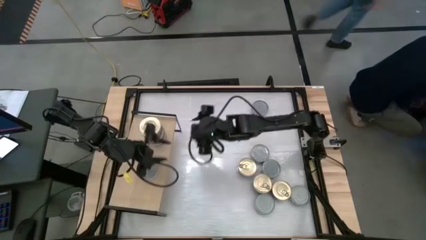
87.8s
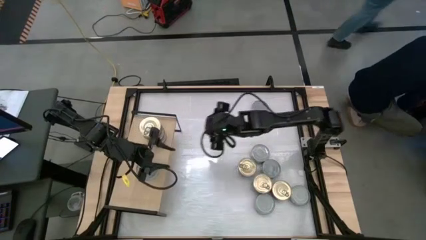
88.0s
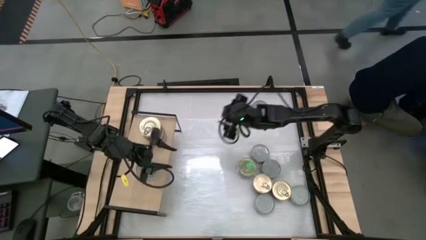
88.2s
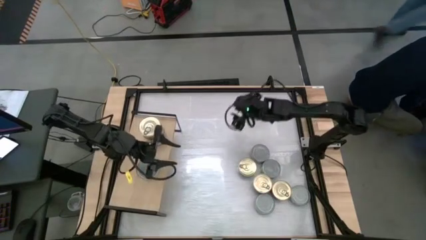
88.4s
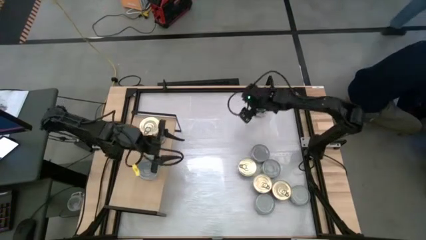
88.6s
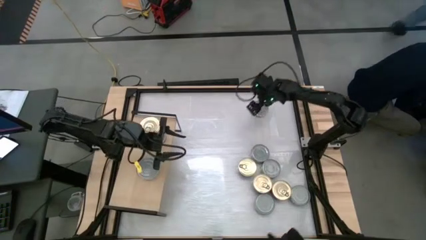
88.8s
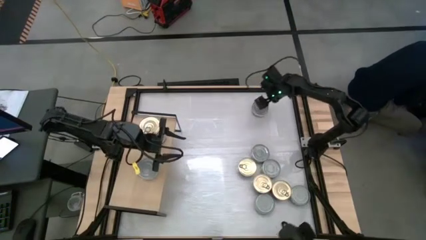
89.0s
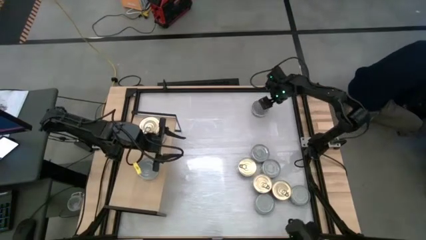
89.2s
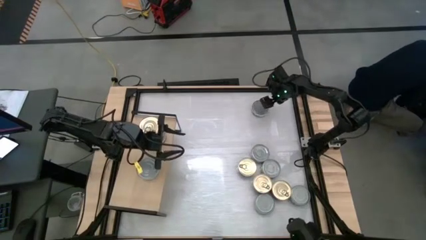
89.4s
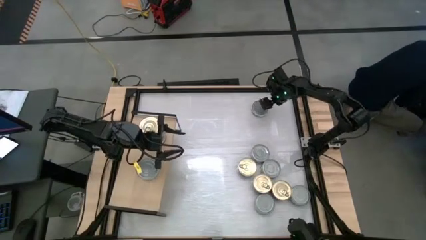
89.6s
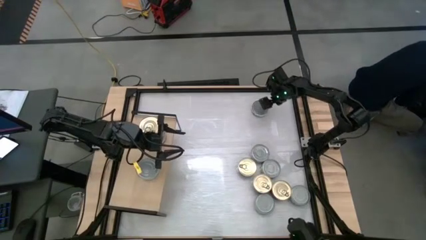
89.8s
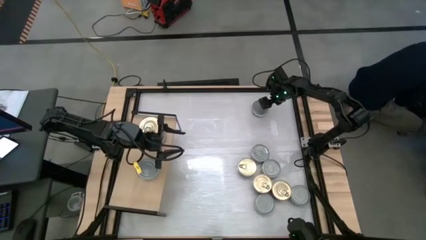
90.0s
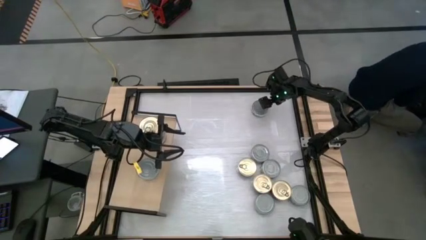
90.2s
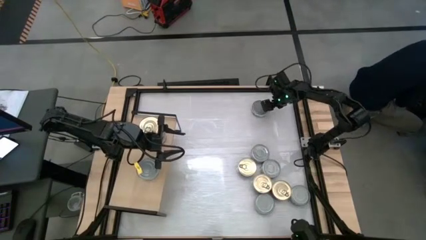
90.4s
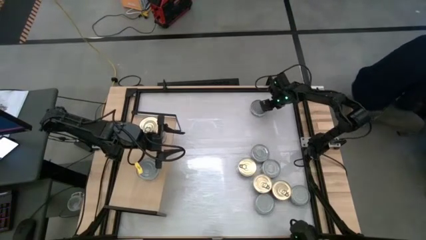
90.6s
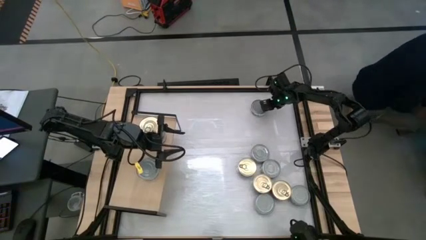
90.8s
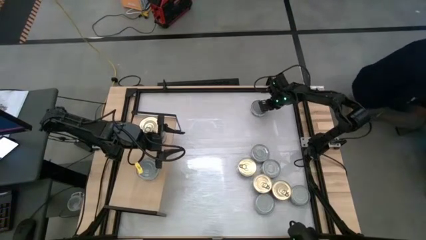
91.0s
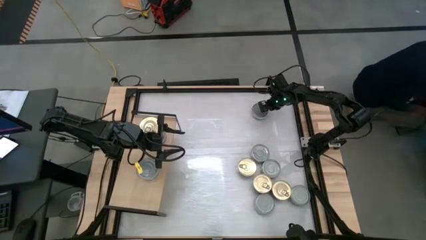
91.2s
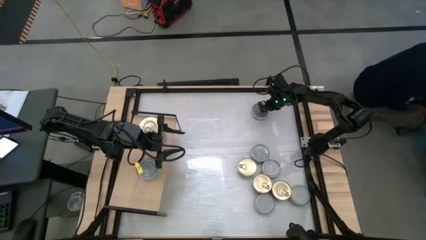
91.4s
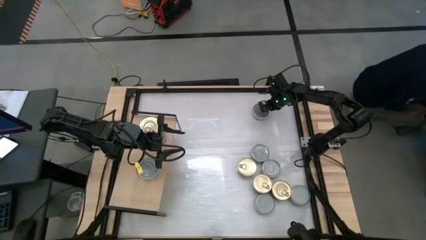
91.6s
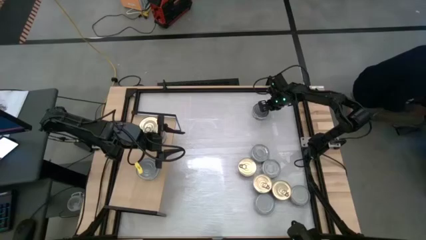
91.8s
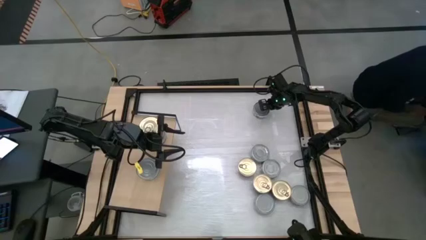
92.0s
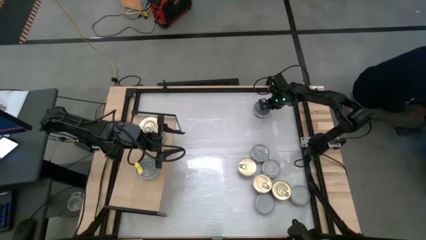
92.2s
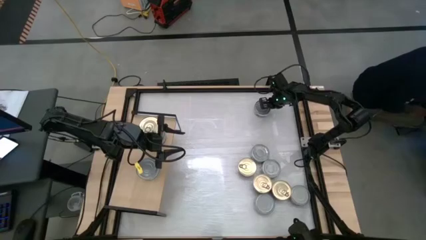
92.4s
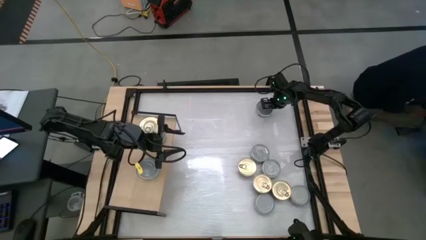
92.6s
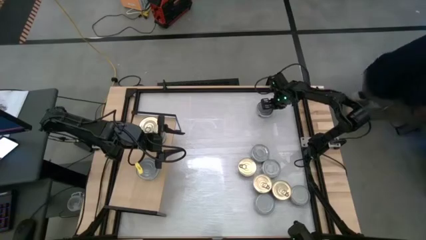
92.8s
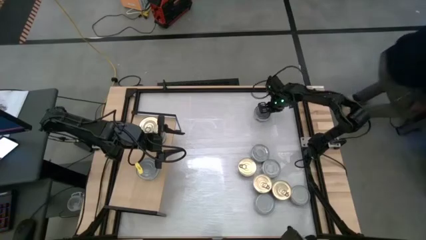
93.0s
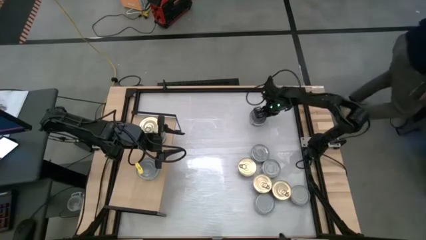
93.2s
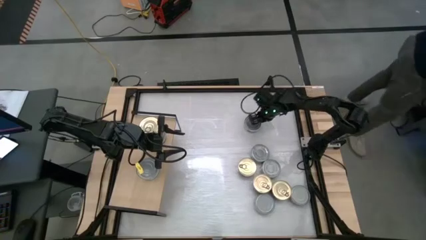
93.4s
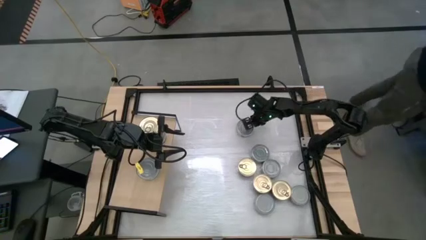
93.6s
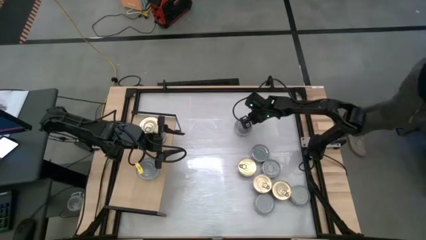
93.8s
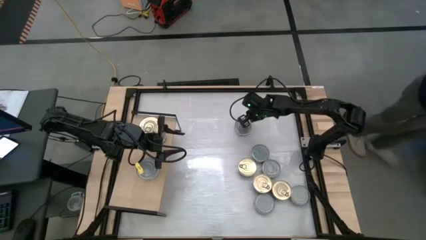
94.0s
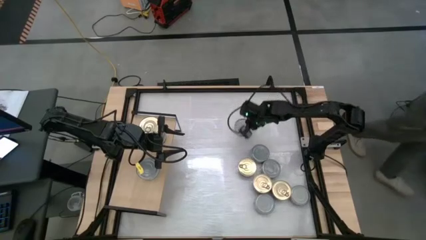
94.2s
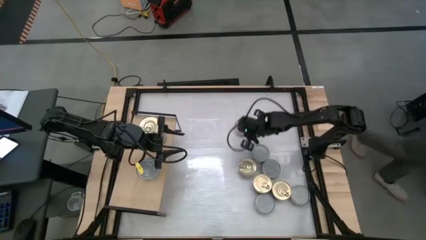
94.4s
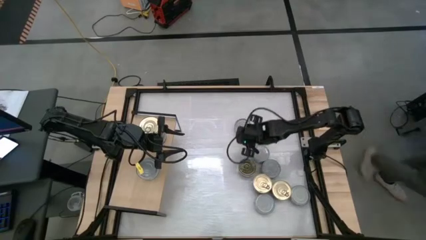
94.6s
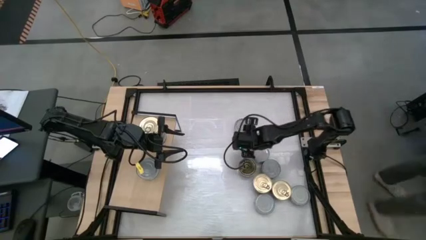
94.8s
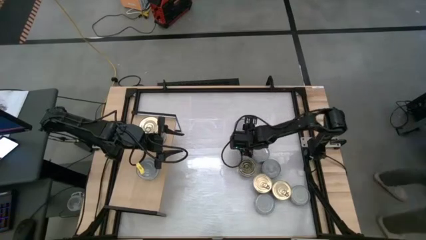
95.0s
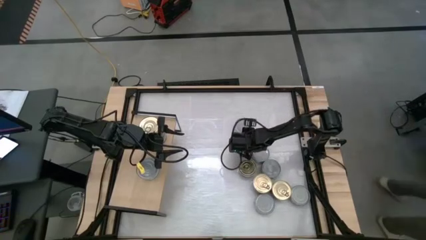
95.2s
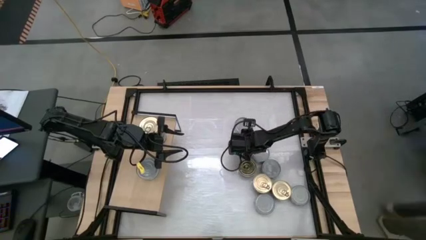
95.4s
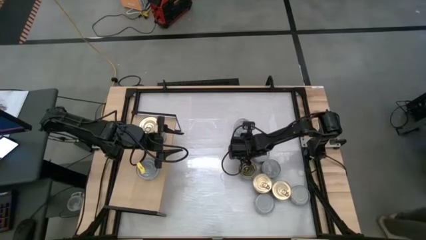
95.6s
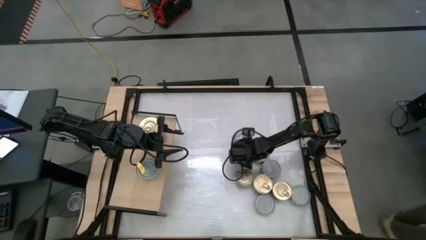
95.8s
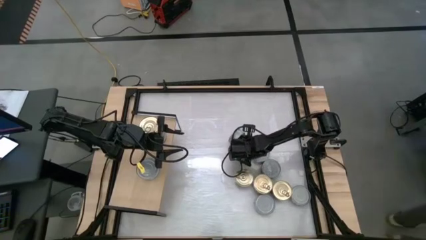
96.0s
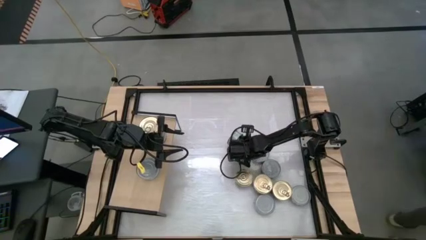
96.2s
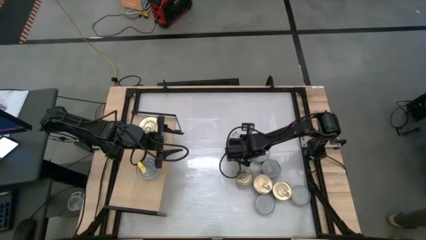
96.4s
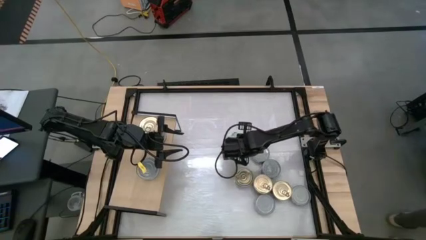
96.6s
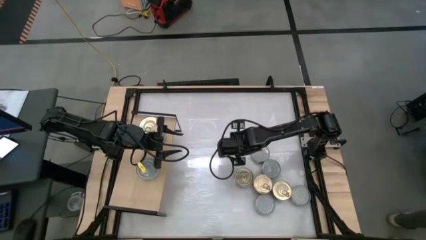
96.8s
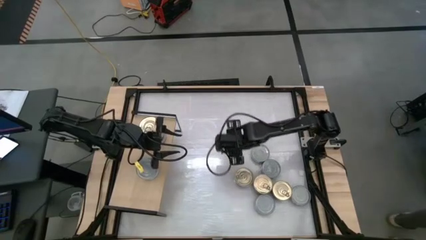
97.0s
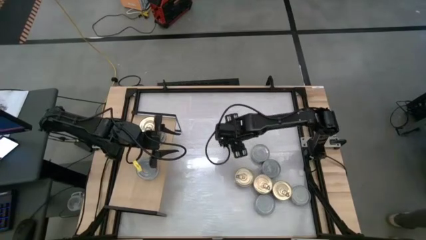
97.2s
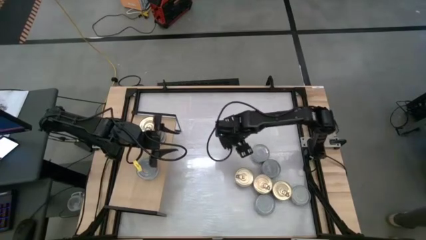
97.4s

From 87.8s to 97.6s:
Task: Stack canned seafood by type on shelf
Stack the green tuna can on top of the green tuna can on the shelf

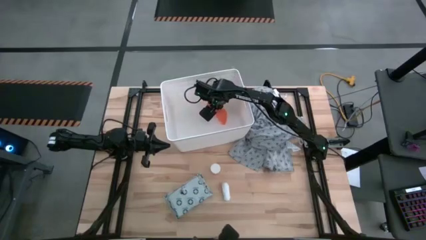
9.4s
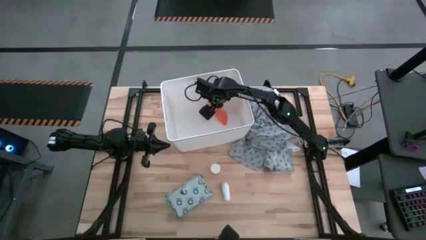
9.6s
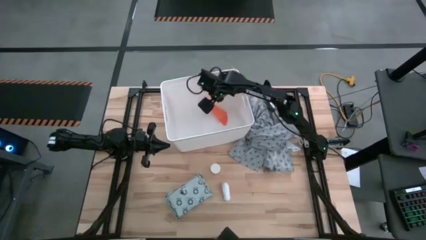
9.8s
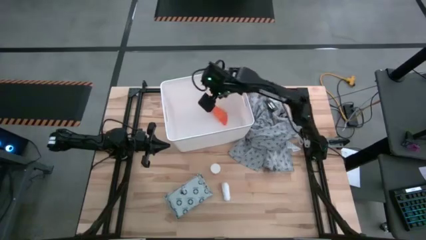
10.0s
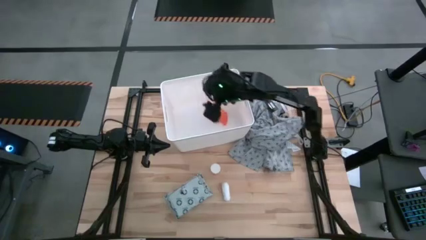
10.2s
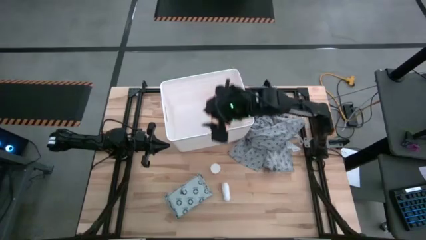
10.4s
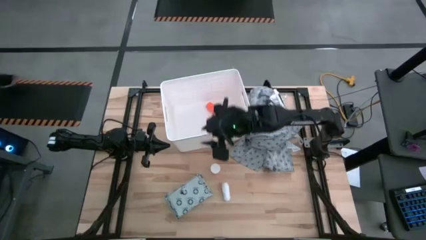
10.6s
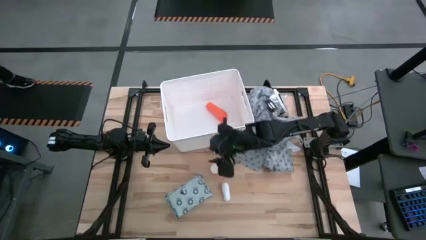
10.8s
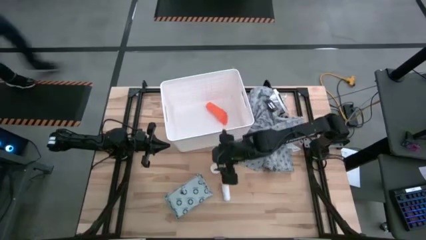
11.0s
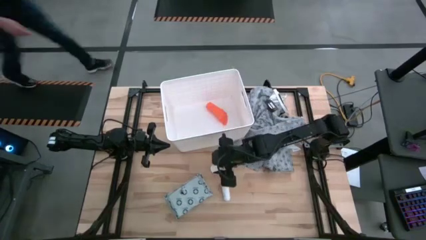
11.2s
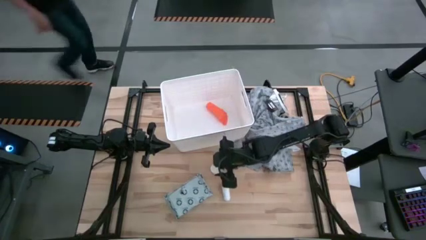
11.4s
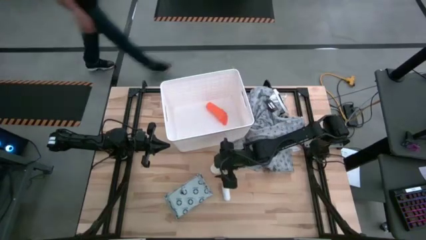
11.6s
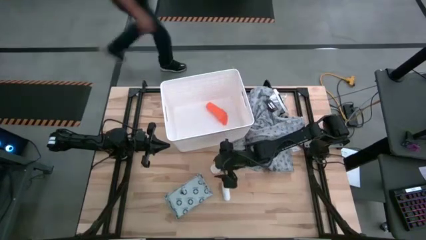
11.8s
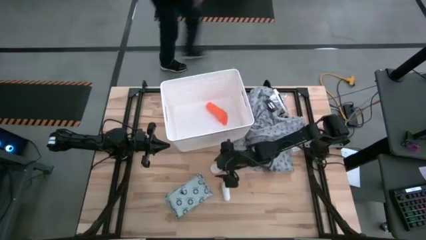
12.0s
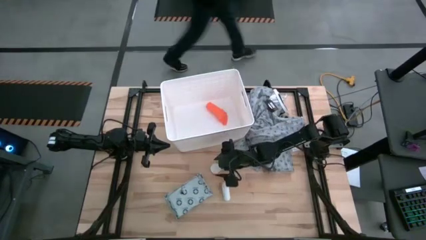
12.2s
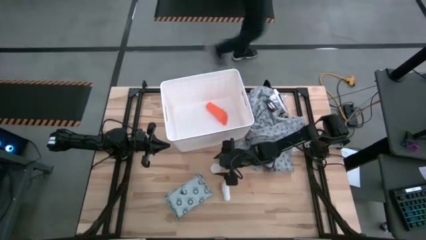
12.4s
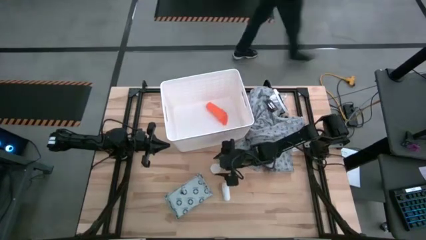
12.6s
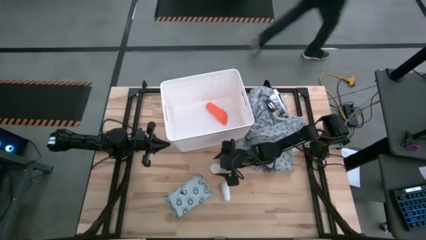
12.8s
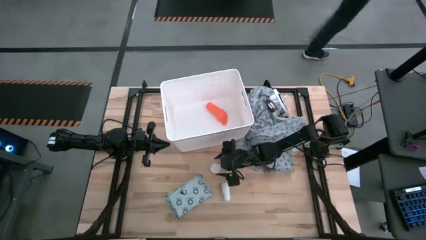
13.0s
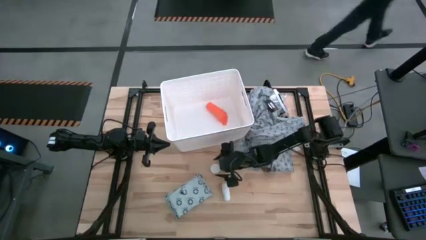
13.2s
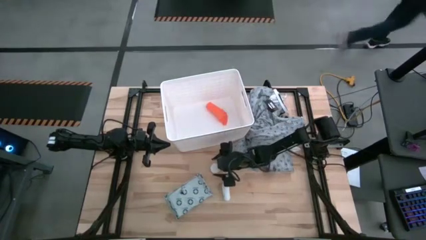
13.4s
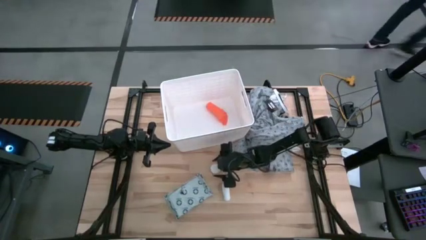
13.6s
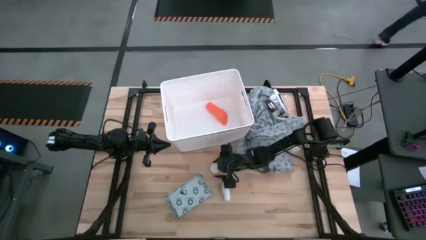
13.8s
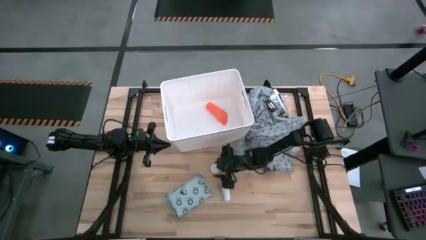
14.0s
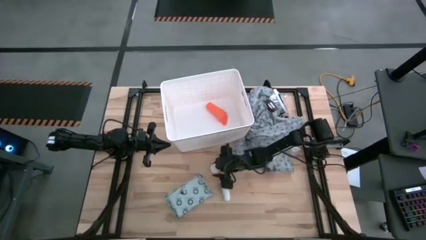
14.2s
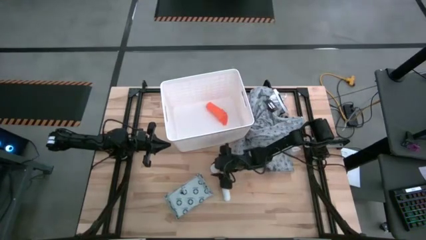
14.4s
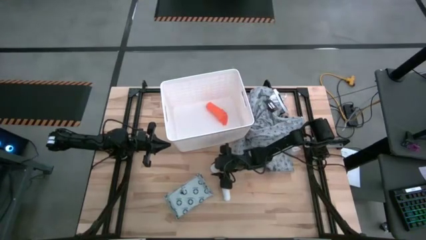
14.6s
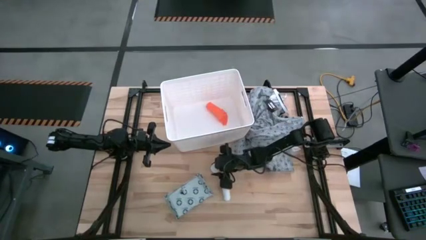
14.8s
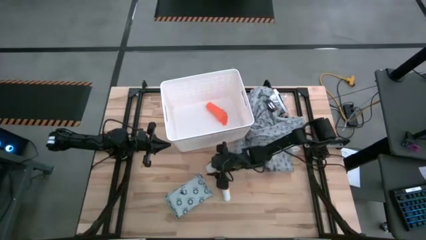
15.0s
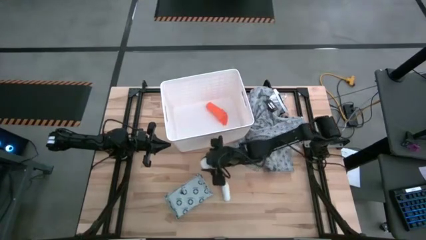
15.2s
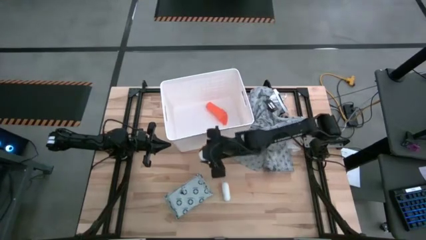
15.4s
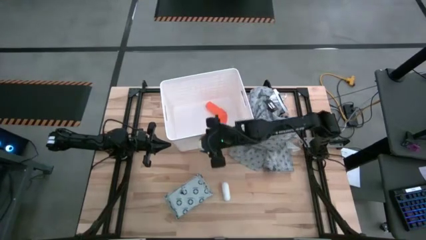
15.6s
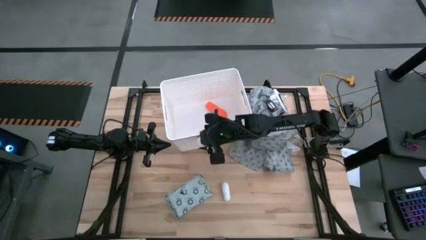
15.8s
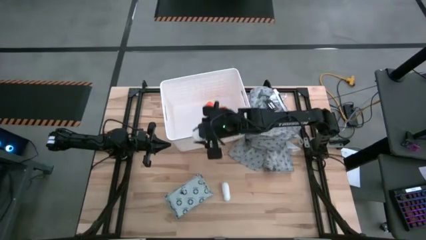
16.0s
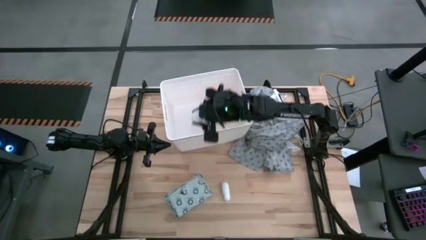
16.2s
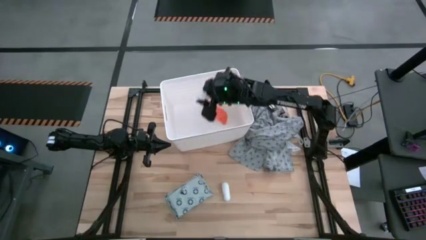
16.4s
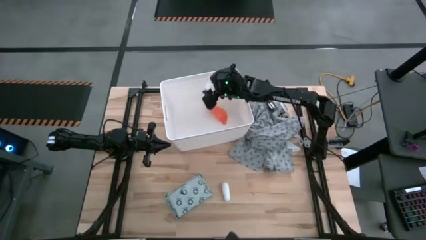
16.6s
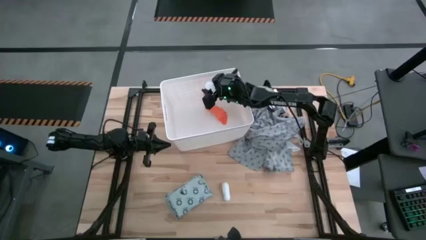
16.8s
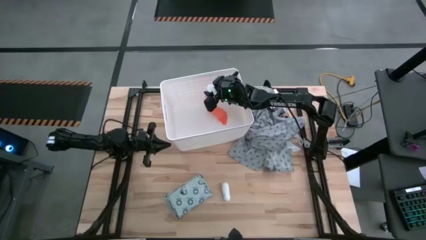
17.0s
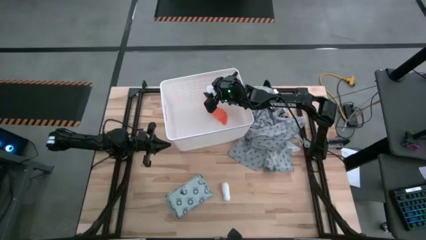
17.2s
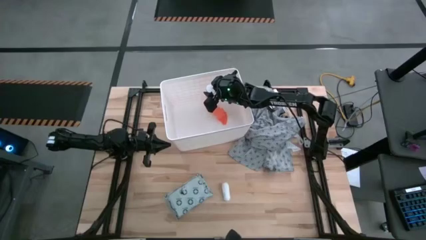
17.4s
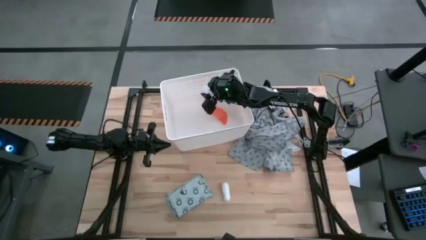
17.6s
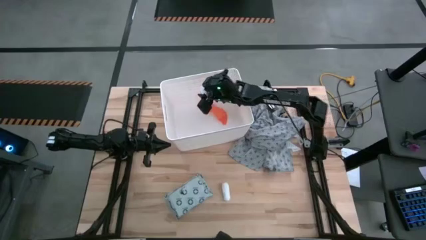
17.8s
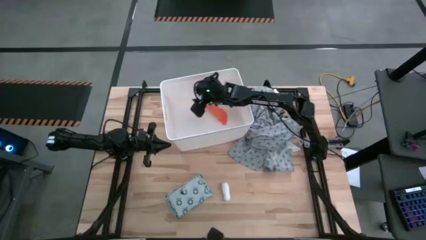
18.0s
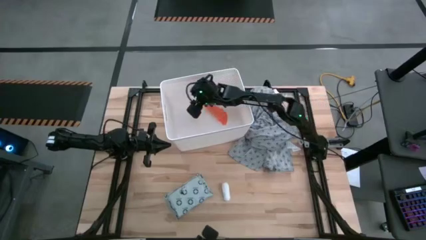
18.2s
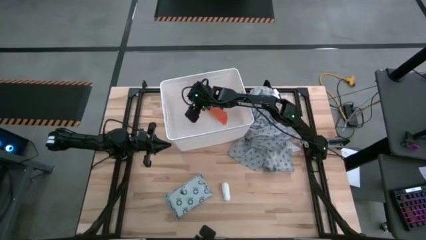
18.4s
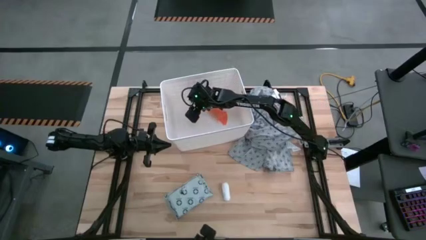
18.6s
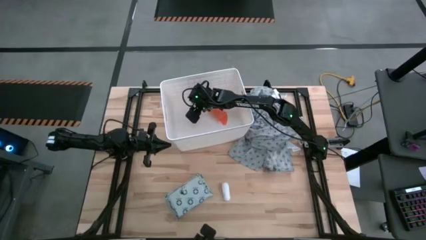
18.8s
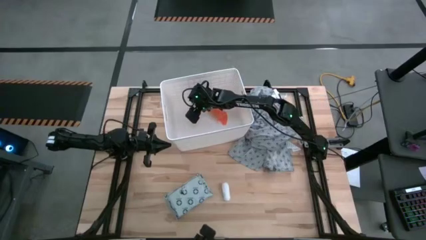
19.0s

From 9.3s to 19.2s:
Task: Pick & place medical supplies in basket/bin
Put the white medicine bottle into the white bin
